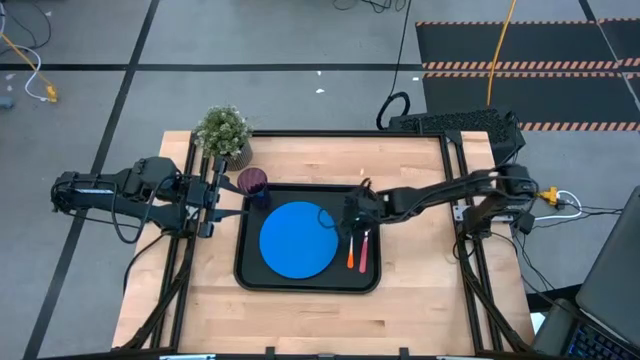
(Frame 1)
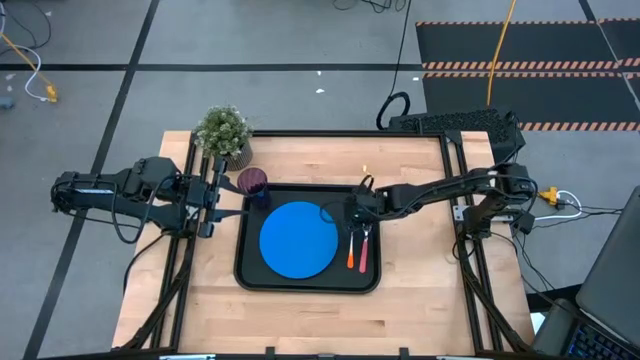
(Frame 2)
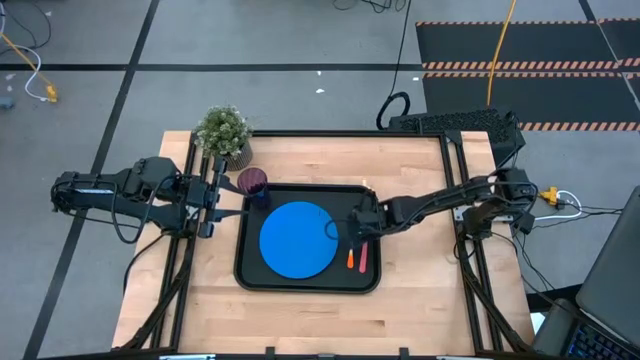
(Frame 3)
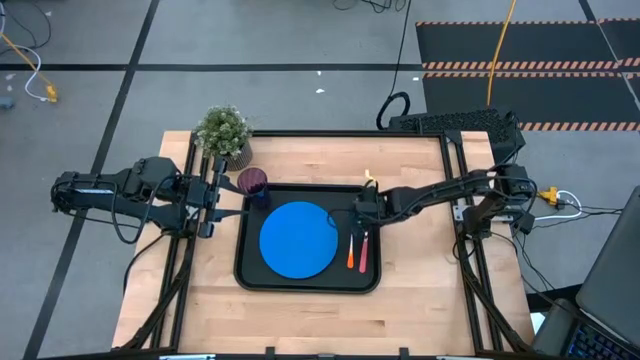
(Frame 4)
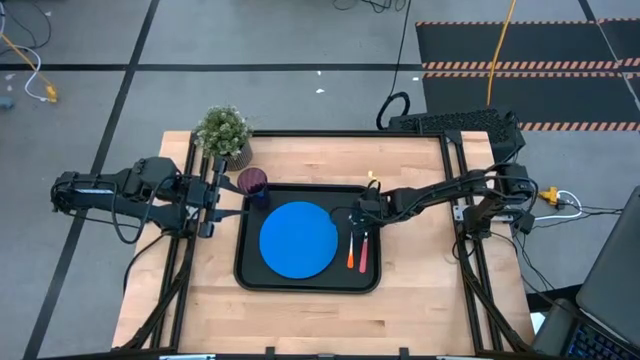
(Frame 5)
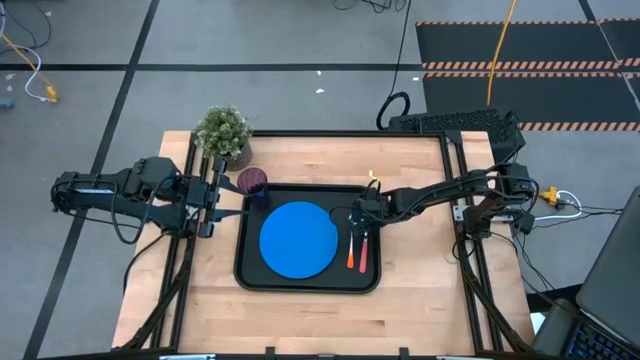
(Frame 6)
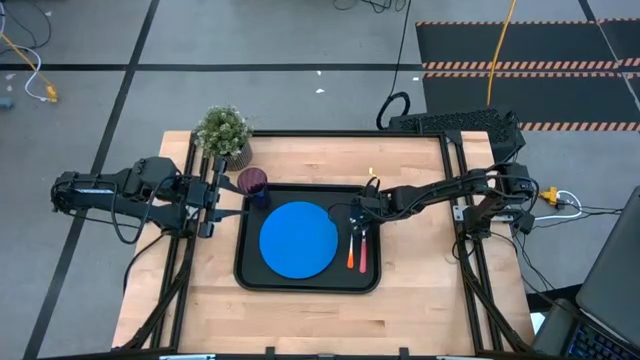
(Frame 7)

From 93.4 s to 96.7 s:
Task: Pick and place plate/cup/fork/spoon on tray
Adjust the pink fork on the black tray

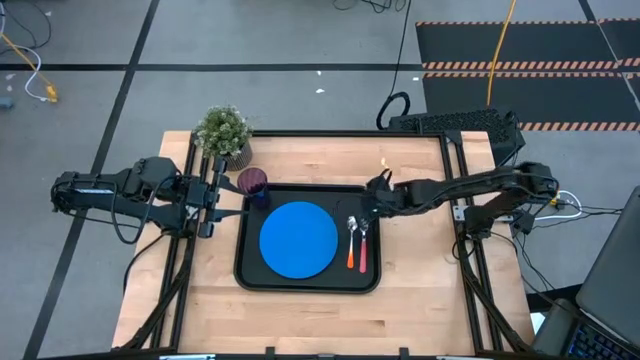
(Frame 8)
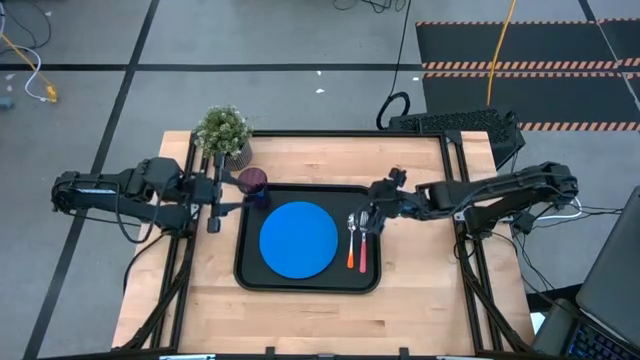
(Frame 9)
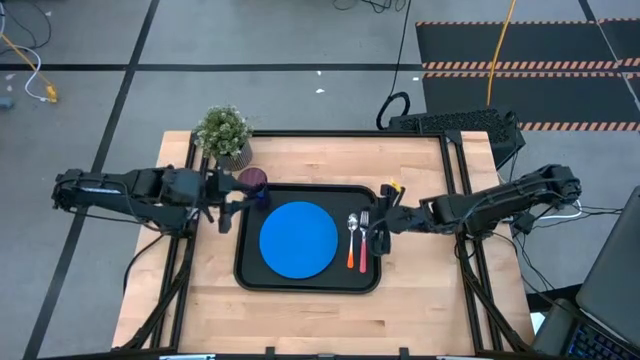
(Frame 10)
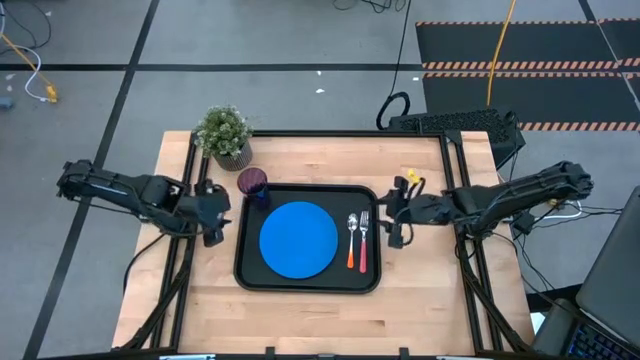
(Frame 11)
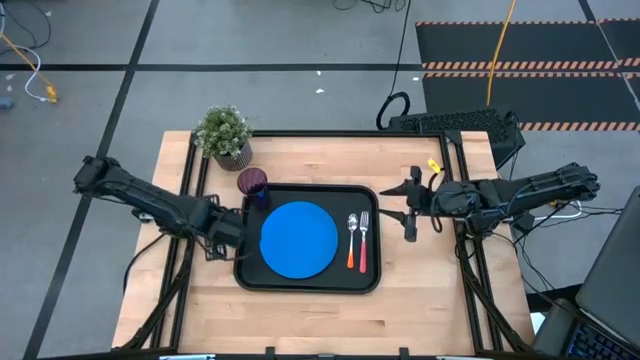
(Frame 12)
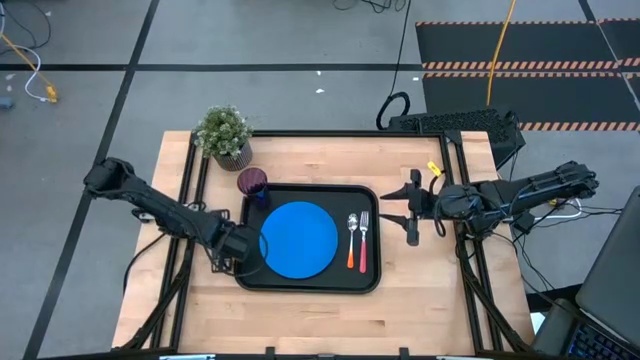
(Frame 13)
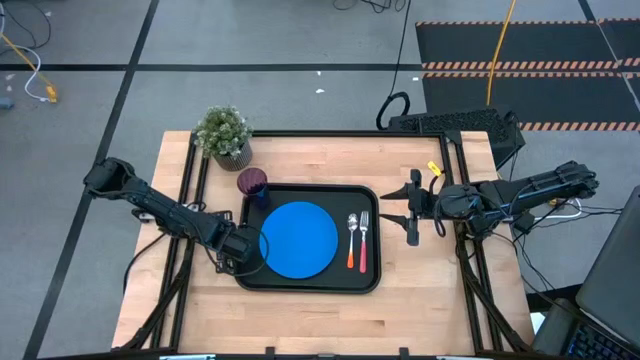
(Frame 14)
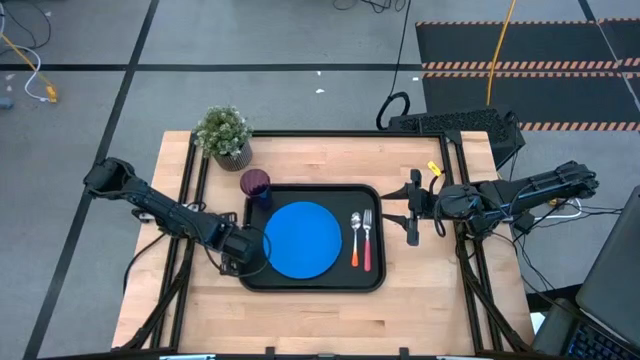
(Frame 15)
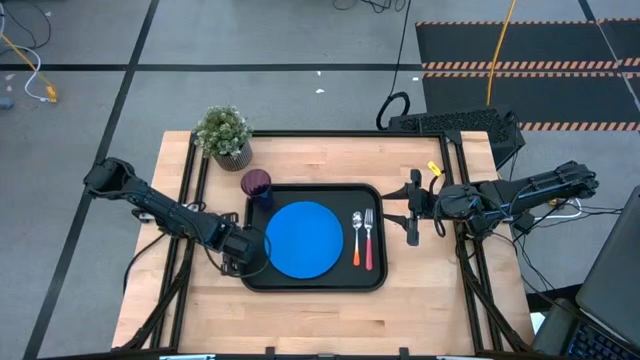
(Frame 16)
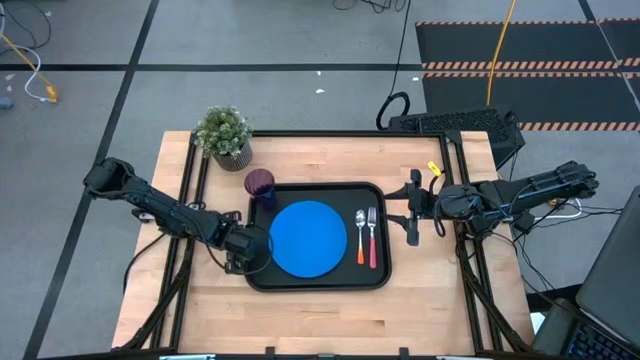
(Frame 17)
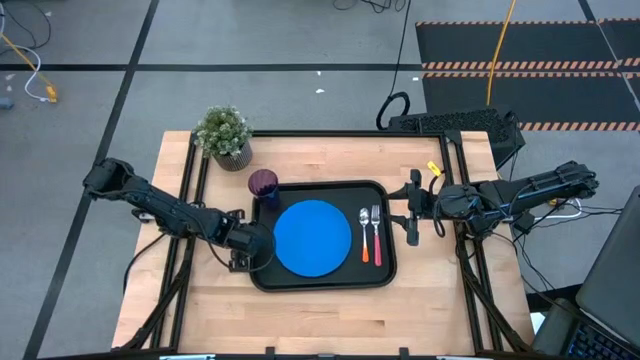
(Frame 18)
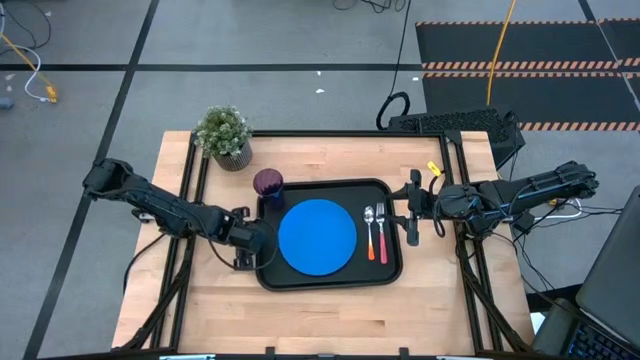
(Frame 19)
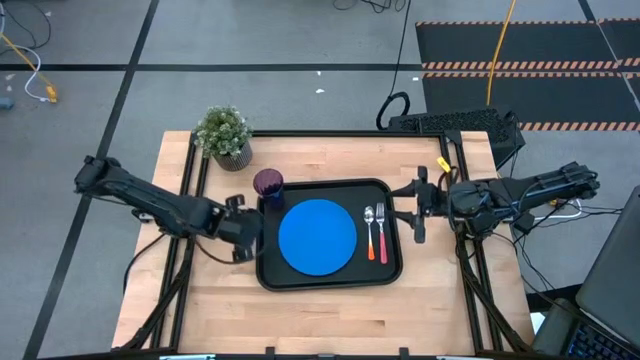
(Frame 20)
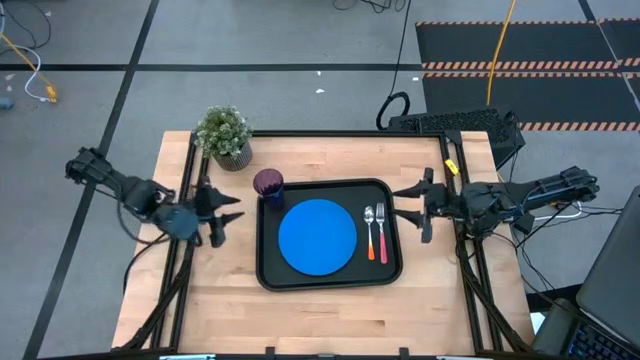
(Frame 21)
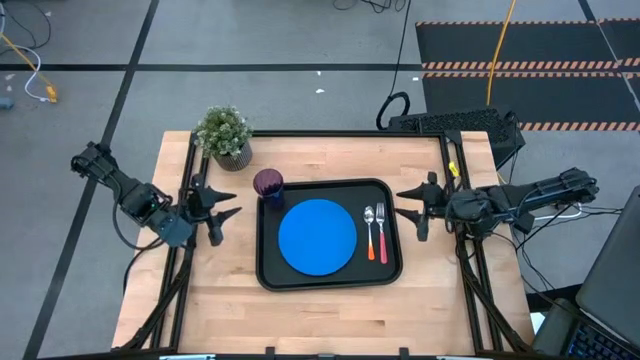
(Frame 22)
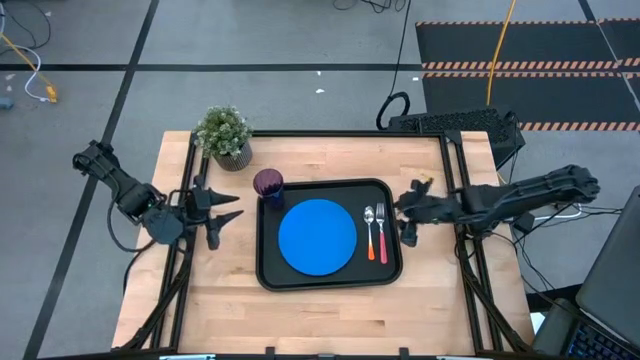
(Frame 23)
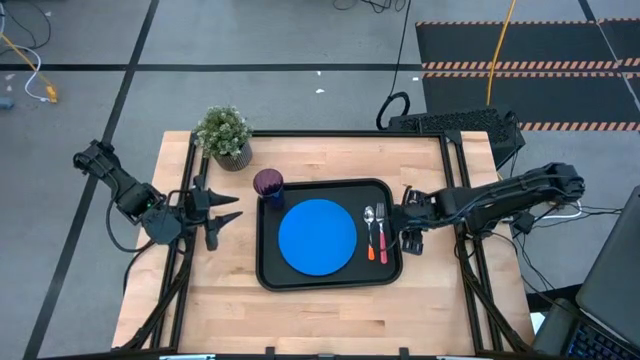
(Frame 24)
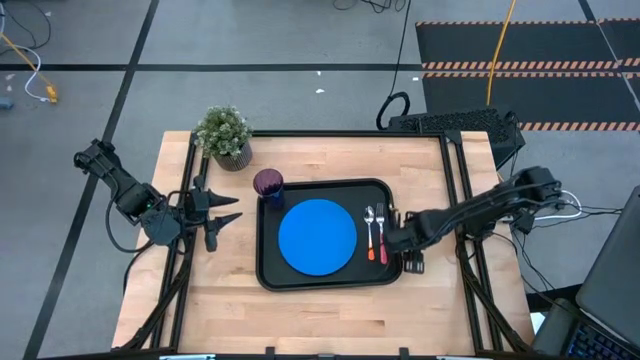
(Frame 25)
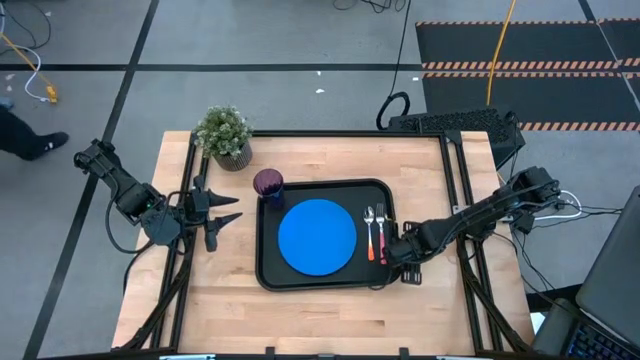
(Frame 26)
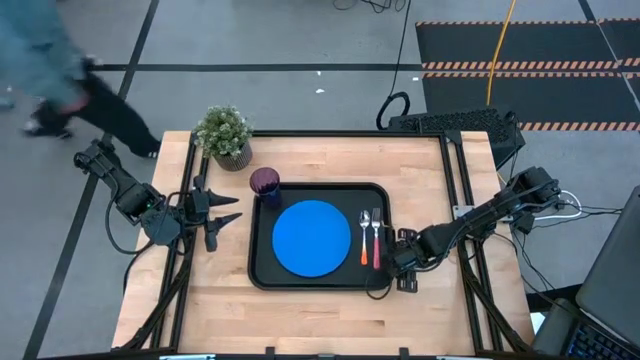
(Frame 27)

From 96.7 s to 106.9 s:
Adjust the black tray

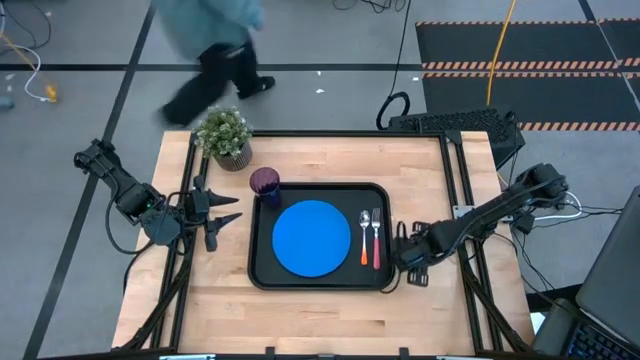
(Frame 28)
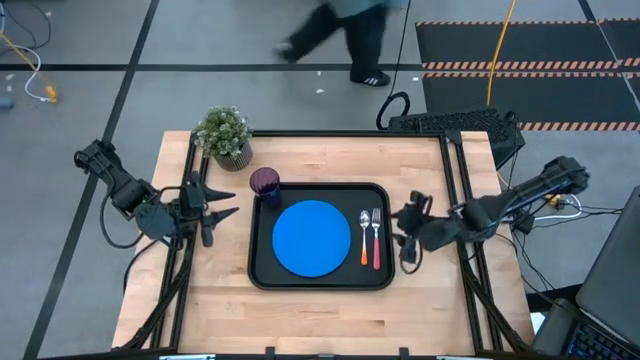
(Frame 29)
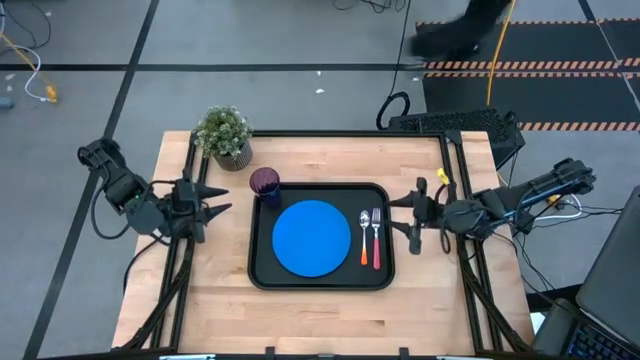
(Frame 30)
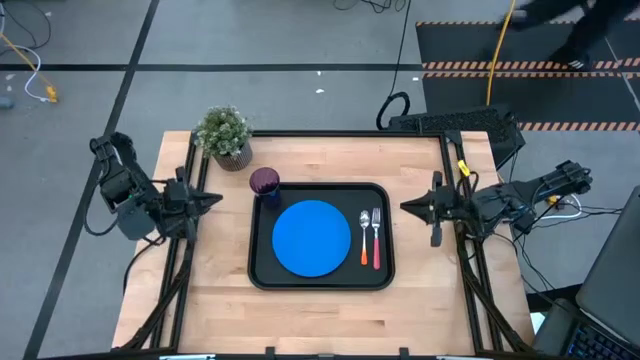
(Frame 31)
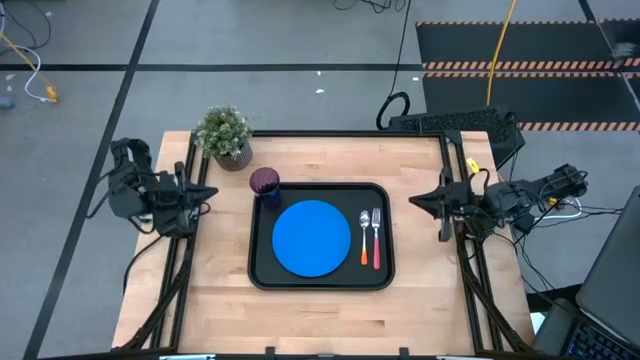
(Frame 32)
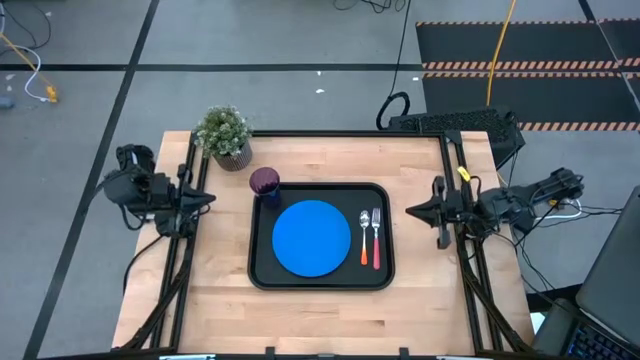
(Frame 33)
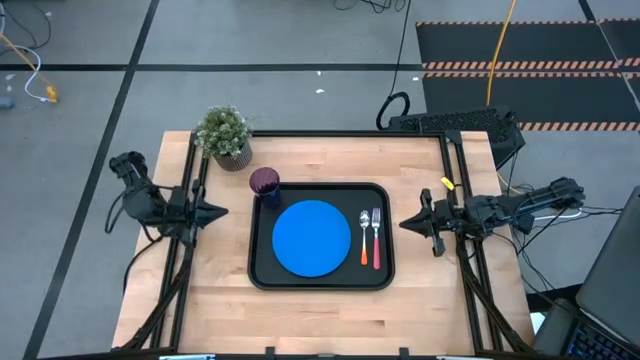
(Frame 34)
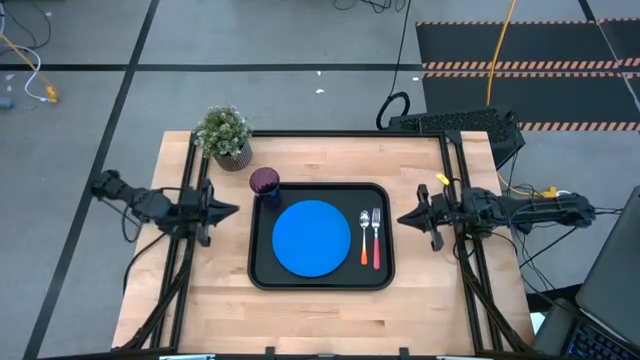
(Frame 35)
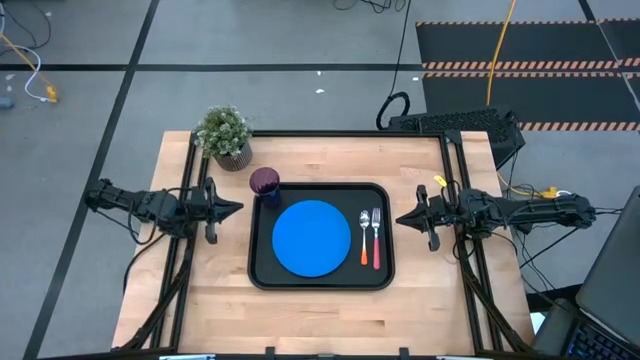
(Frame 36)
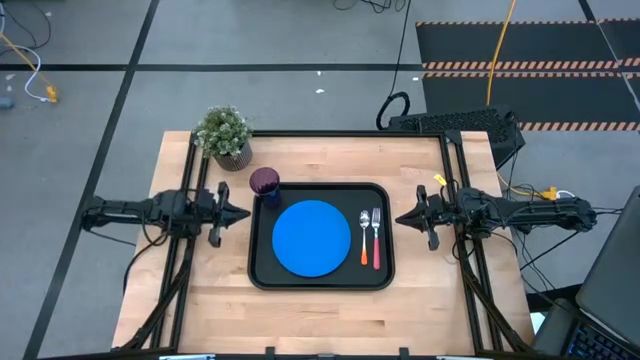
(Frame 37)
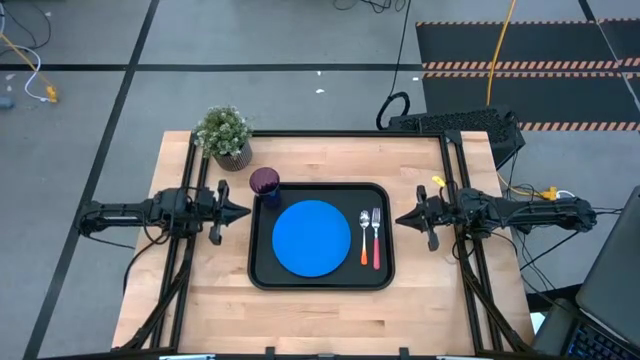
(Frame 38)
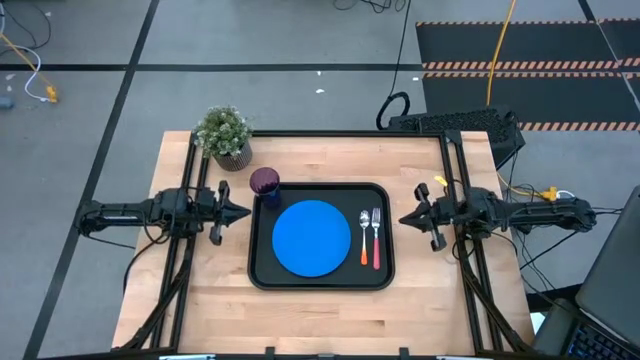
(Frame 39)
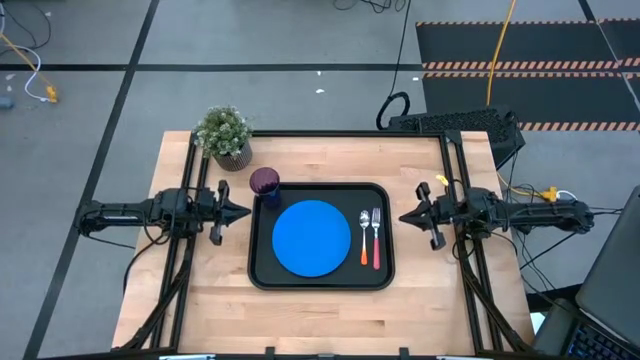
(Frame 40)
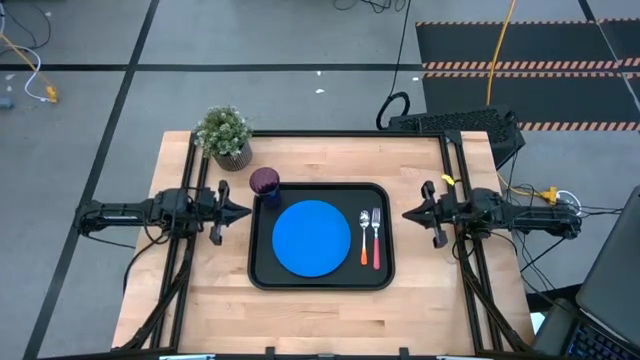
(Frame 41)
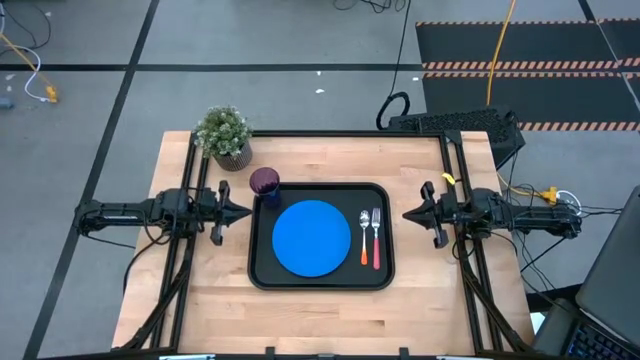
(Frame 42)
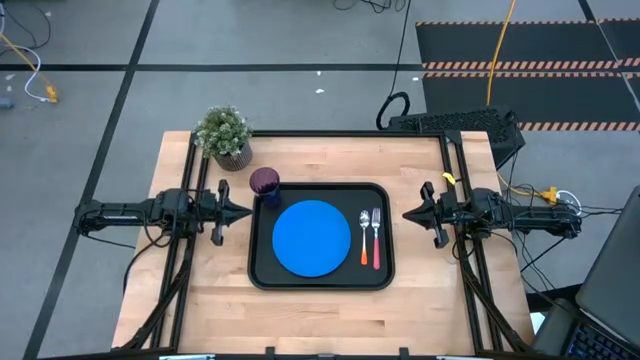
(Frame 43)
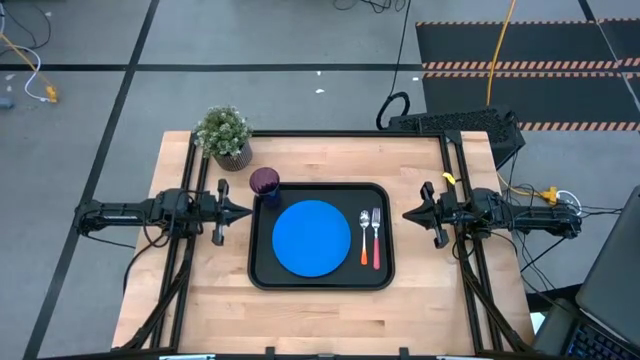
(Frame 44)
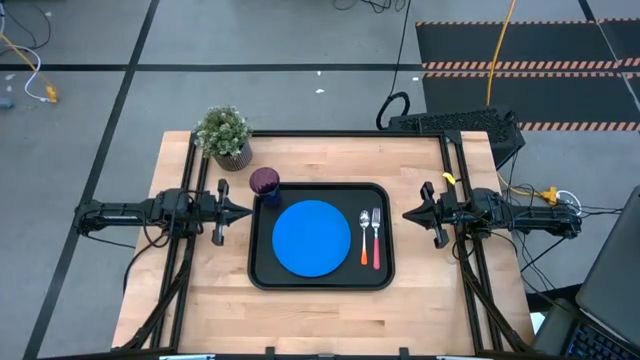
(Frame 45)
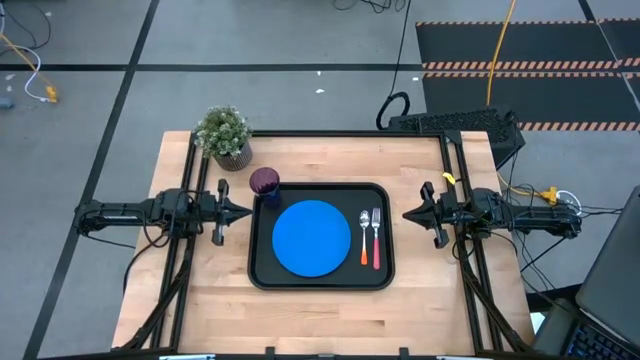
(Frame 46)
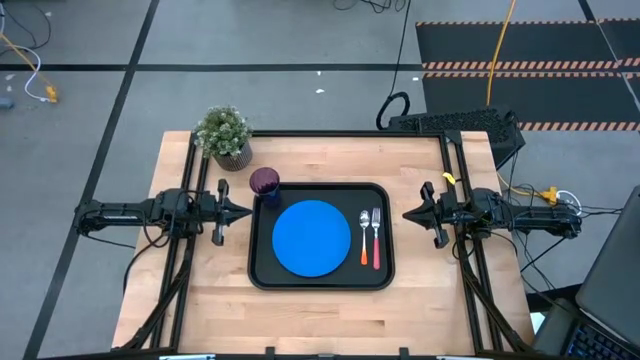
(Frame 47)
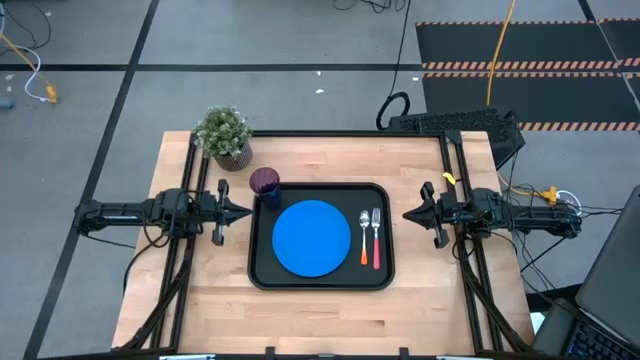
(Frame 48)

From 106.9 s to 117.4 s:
Return to Home Position
